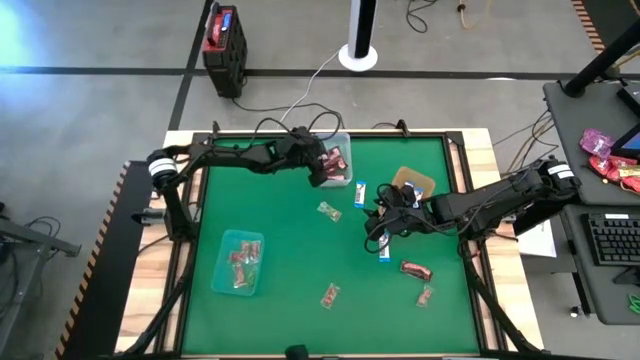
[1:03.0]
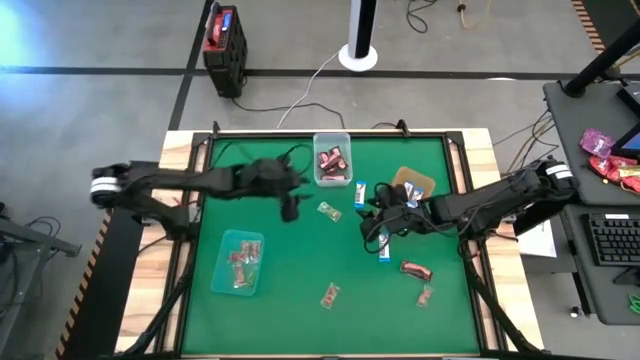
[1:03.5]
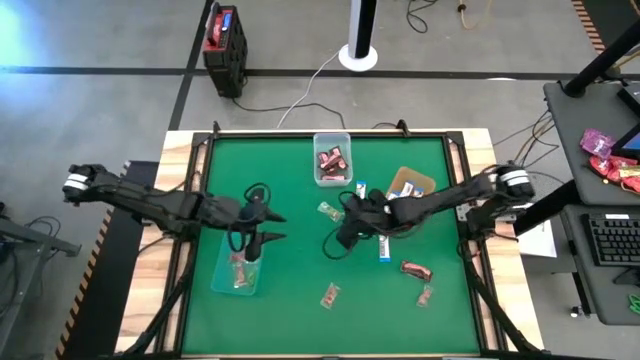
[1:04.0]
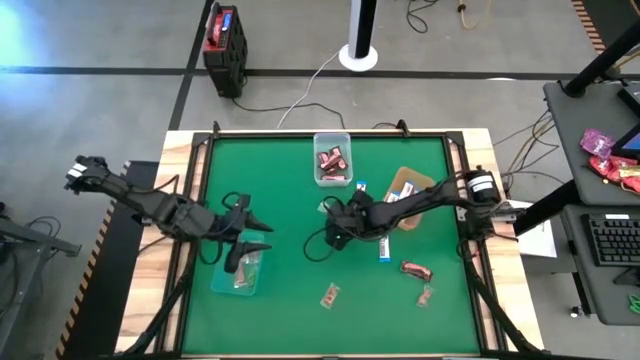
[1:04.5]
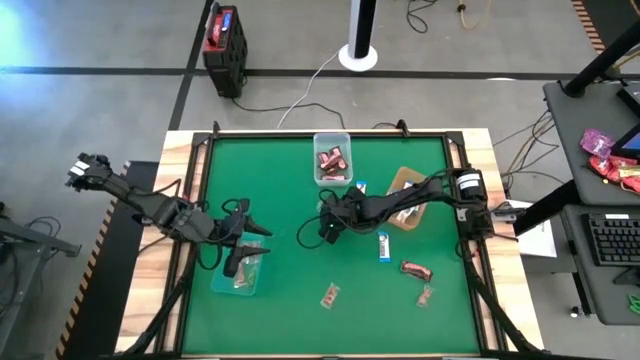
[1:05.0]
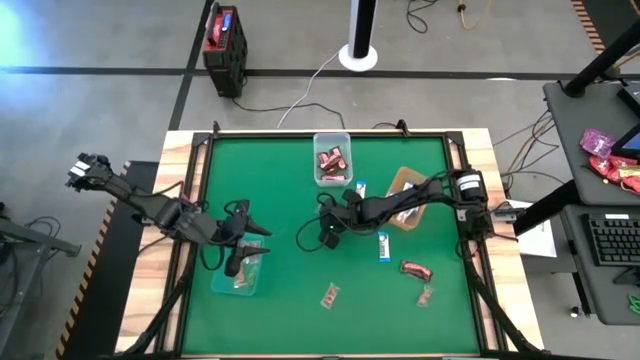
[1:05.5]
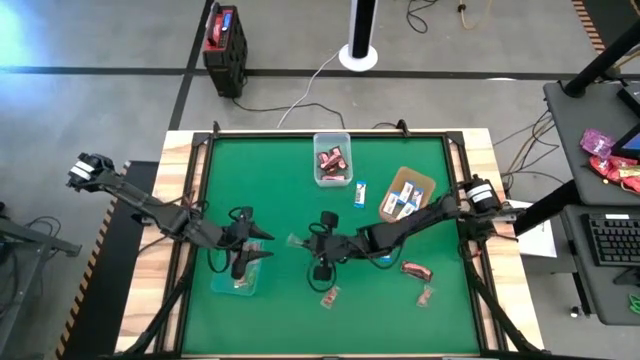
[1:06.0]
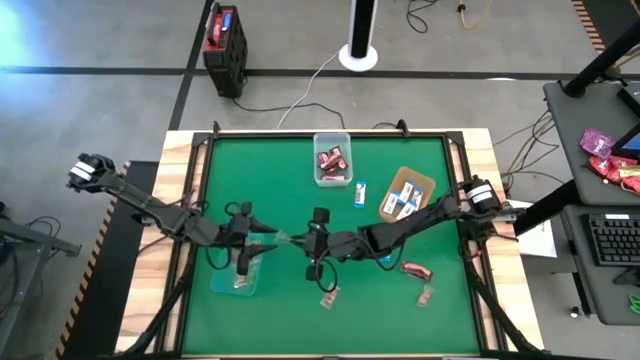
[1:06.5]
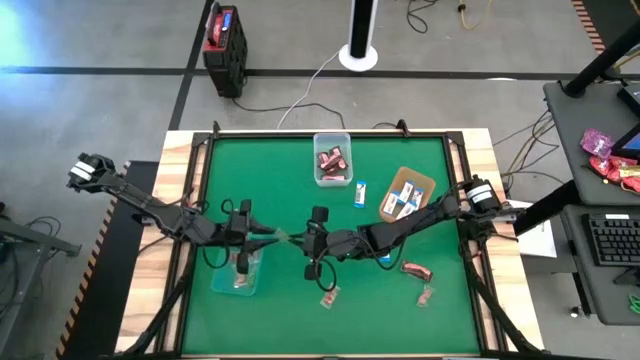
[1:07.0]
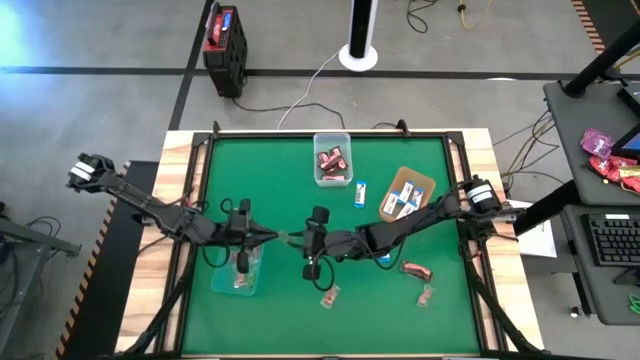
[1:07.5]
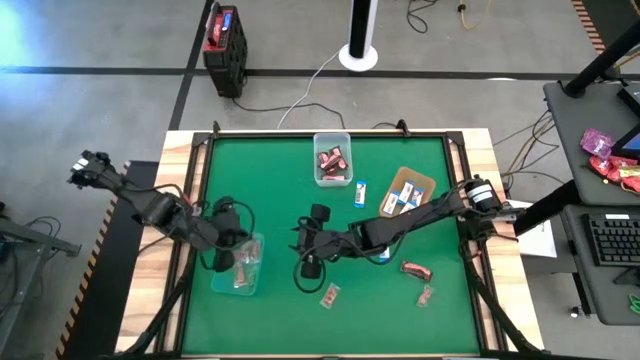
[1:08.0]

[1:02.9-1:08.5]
Task: Sort candy by brand, put in halloween buckets
Put the green gummy candy into the blue bin

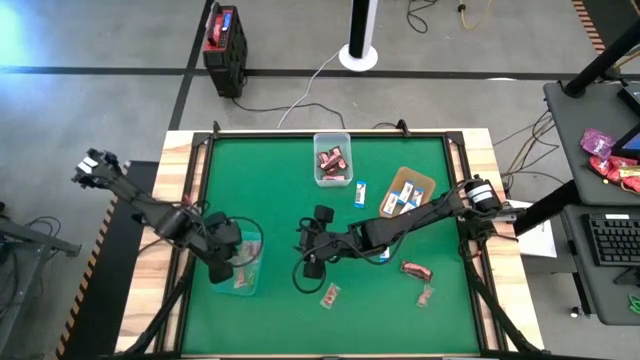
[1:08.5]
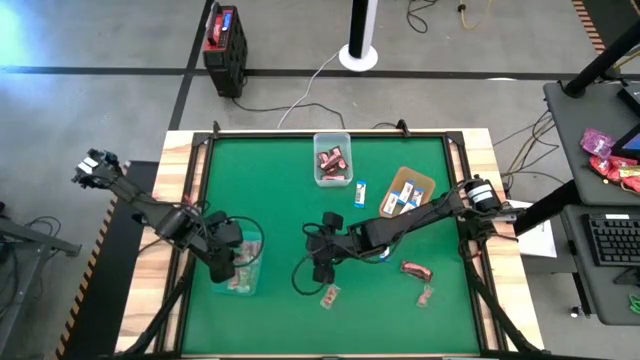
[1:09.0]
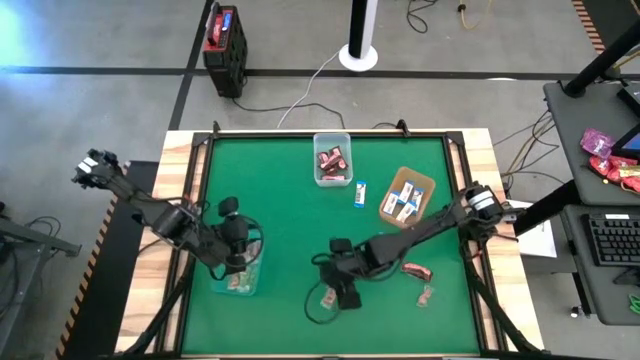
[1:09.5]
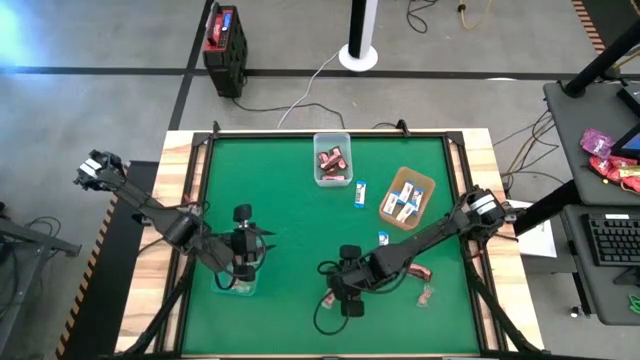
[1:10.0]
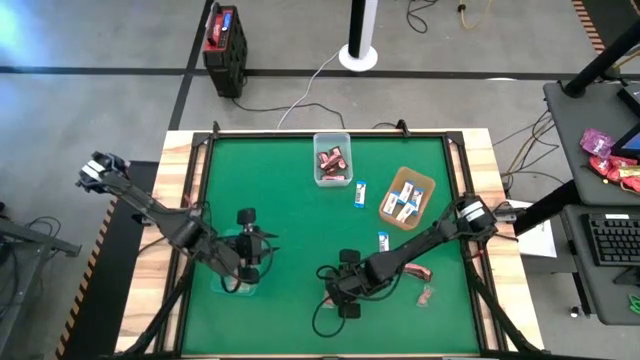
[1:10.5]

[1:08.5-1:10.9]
Put the orange gummy candy into the blue bin

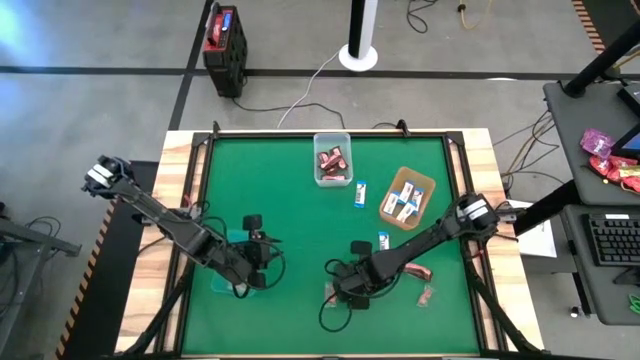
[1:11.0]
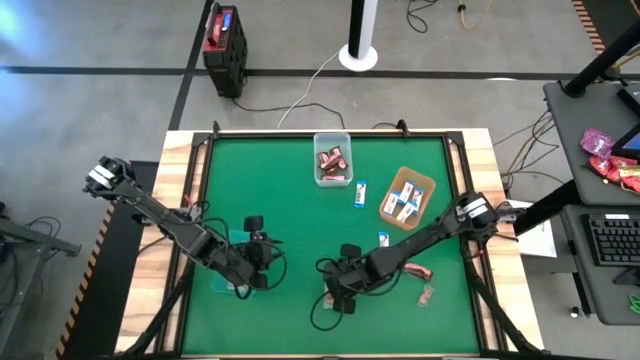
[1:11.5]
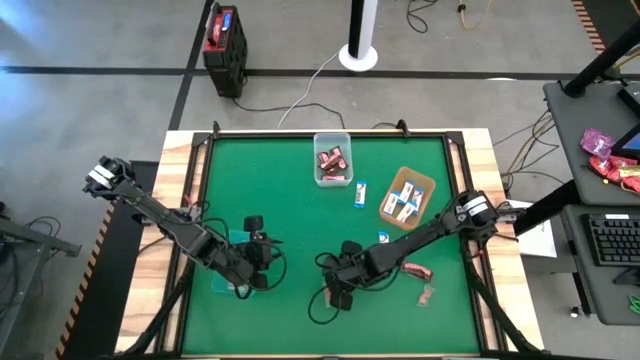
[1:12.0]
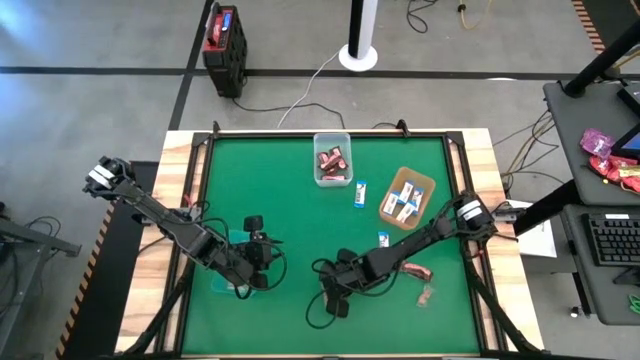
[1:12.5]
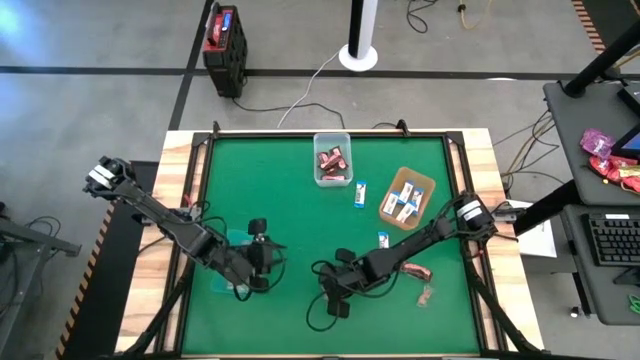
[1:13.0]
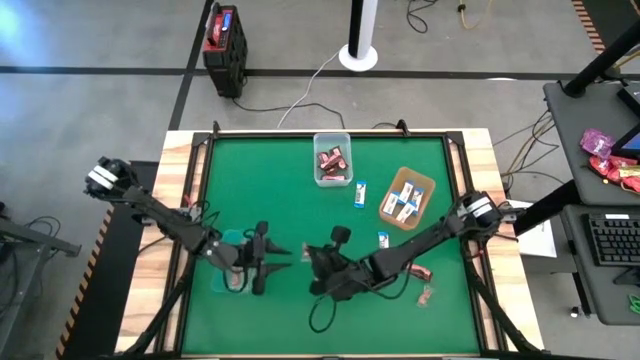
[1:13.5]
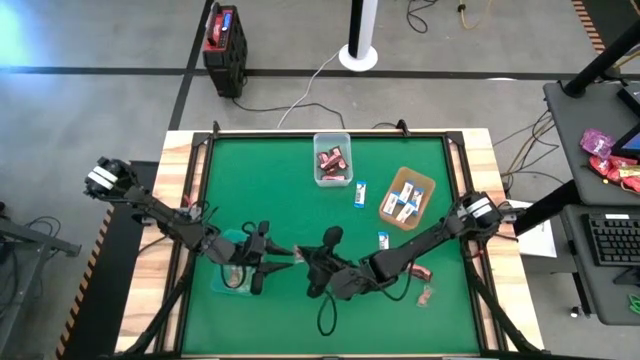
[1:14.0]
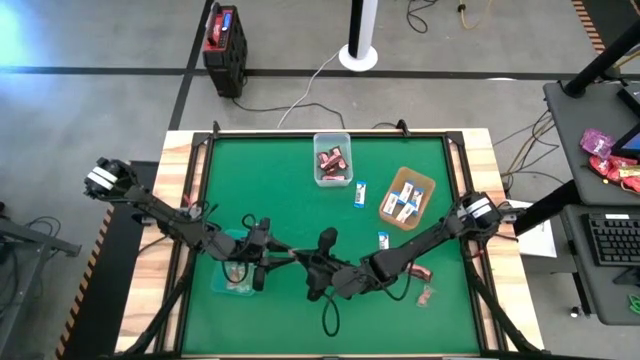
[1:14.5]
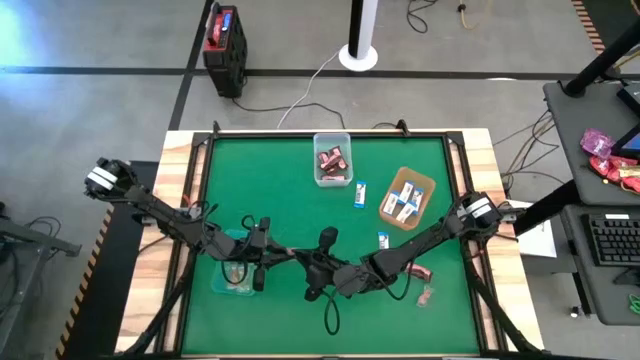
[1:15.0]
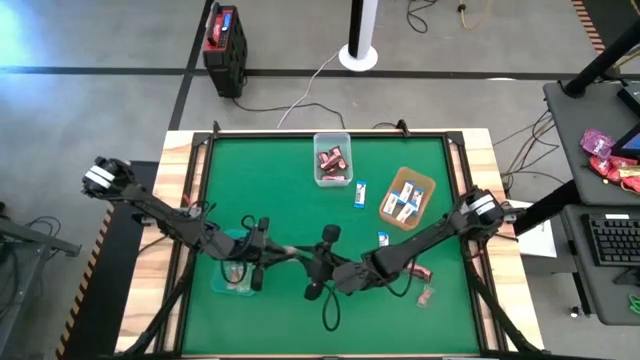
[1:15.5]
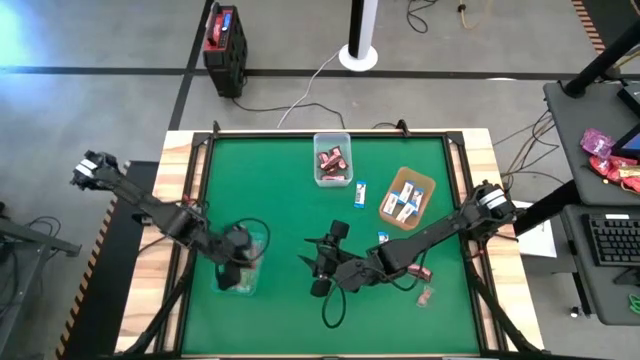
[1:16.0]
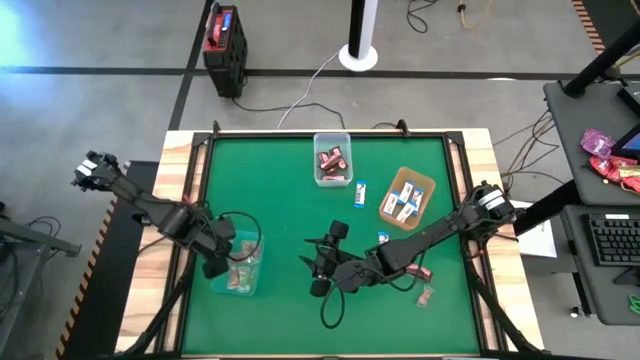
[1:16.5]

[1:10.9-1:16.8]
Put the orange gummy candy into the blue bin

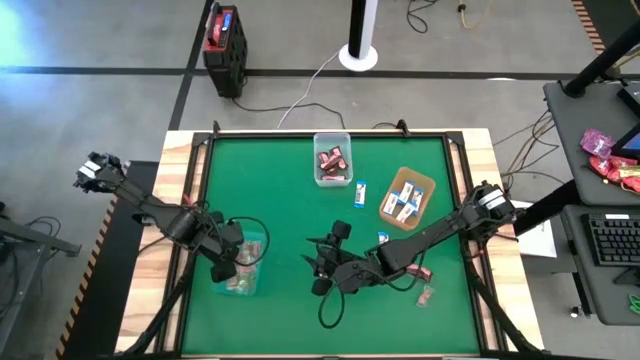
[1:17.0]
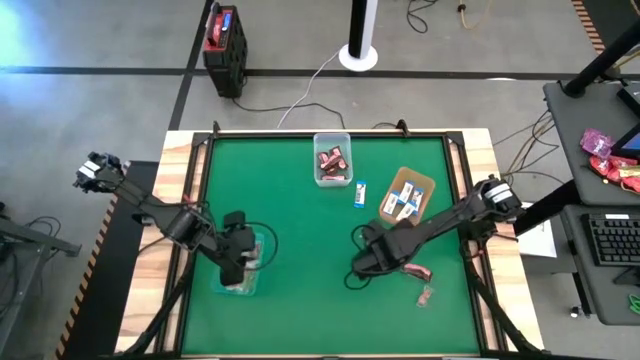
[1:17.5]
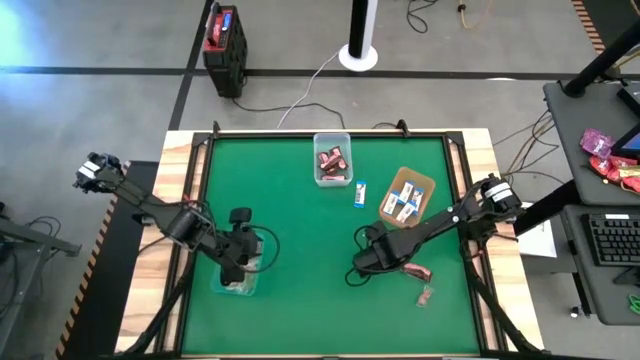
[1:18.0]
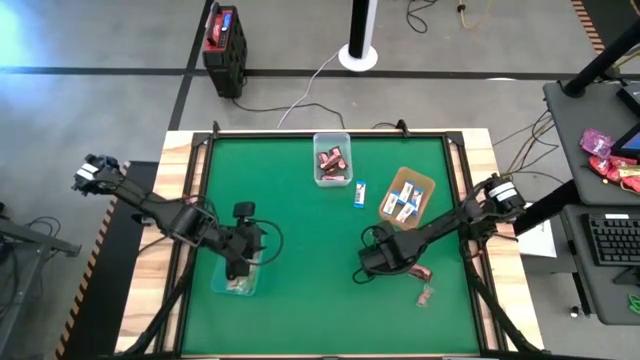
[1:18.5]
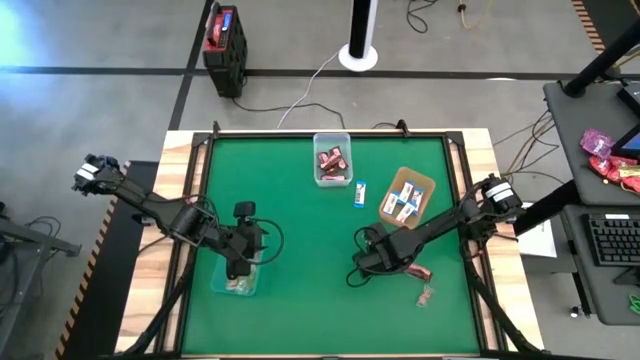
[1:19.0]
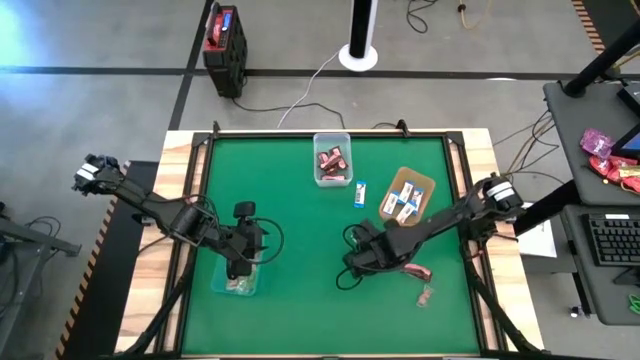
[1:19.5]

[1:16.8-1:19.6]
Put the white chocolate into the orange bin

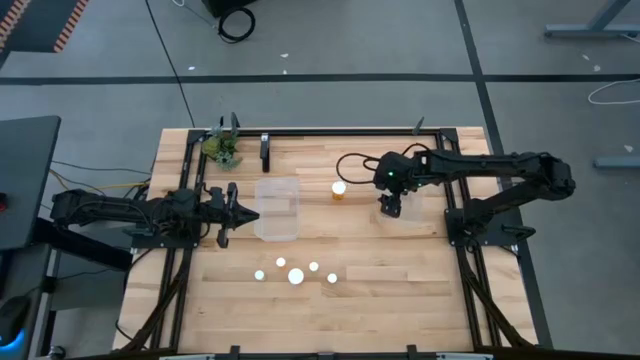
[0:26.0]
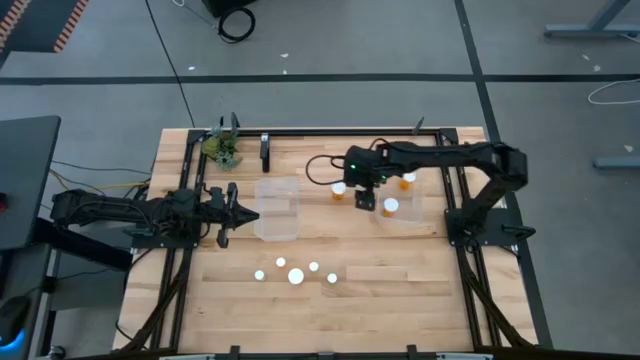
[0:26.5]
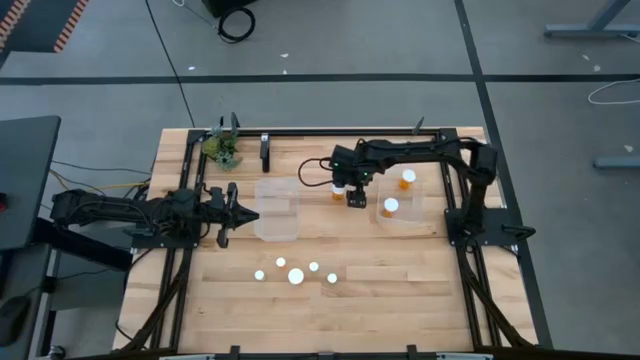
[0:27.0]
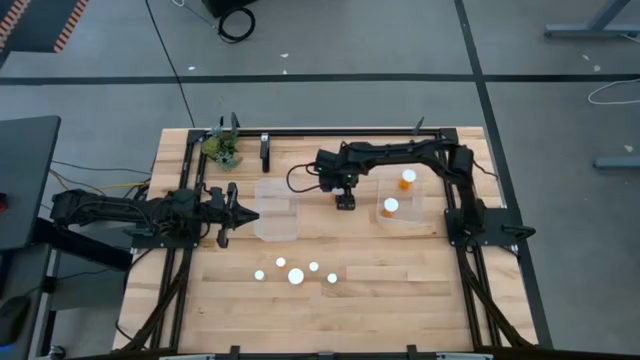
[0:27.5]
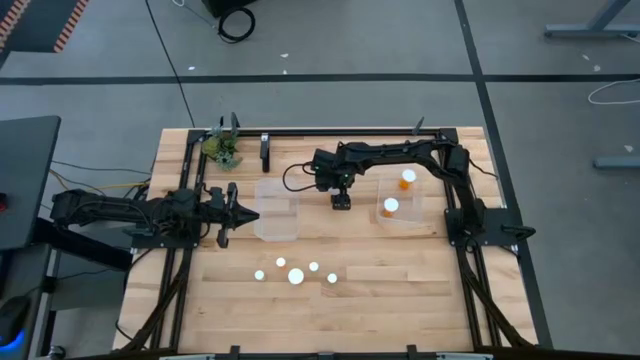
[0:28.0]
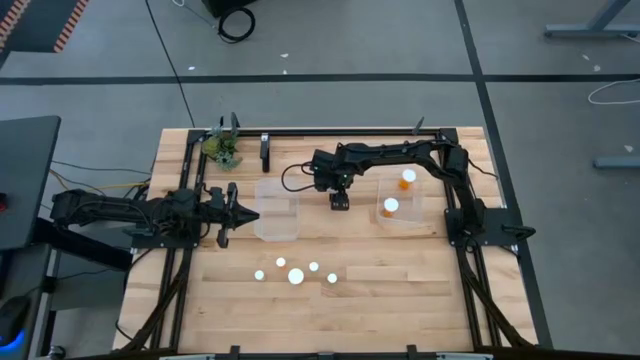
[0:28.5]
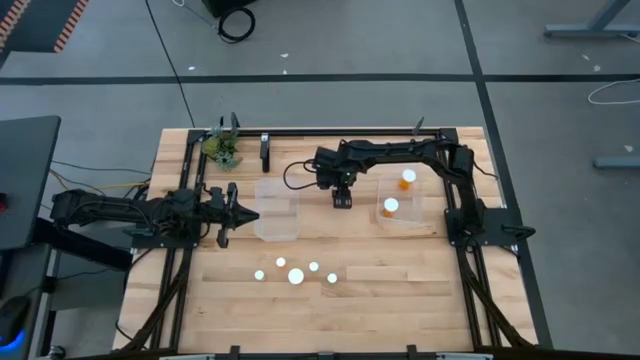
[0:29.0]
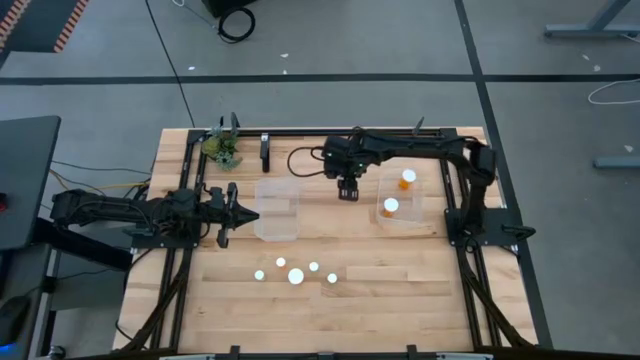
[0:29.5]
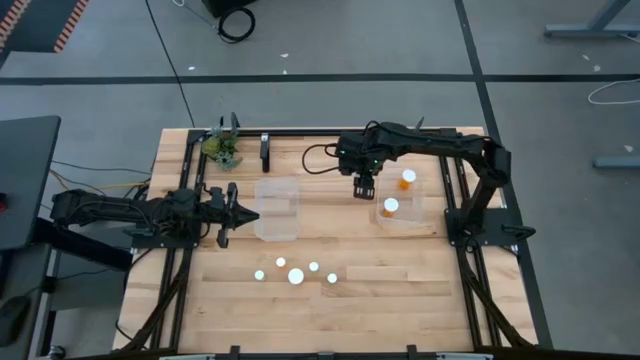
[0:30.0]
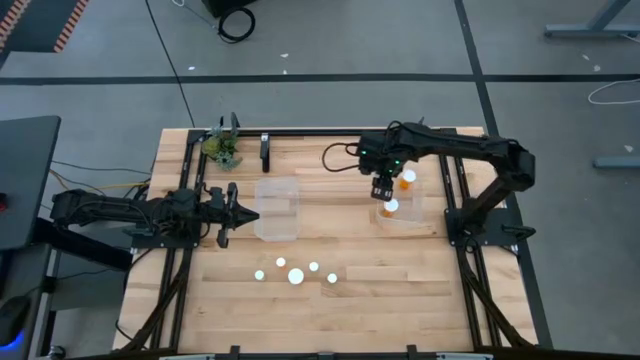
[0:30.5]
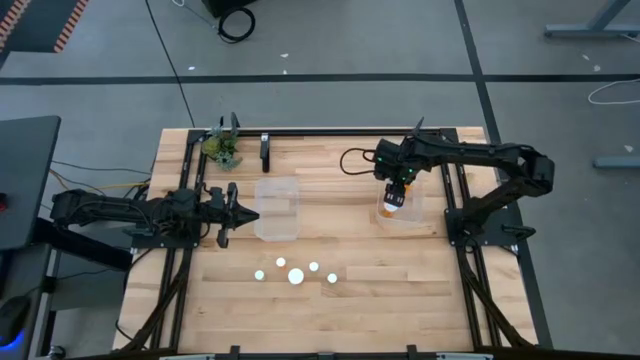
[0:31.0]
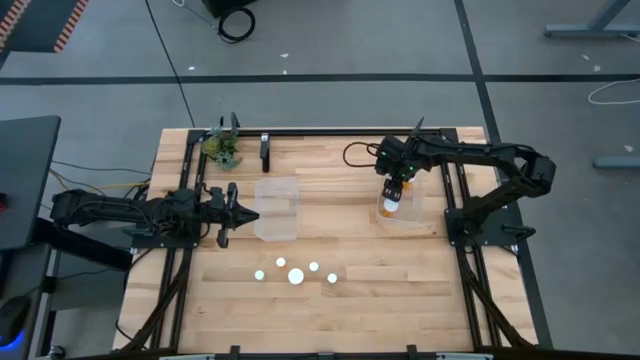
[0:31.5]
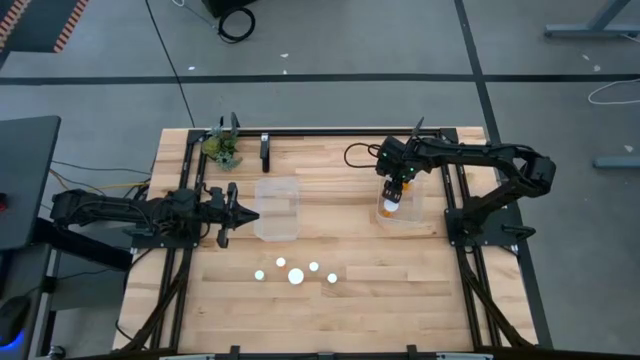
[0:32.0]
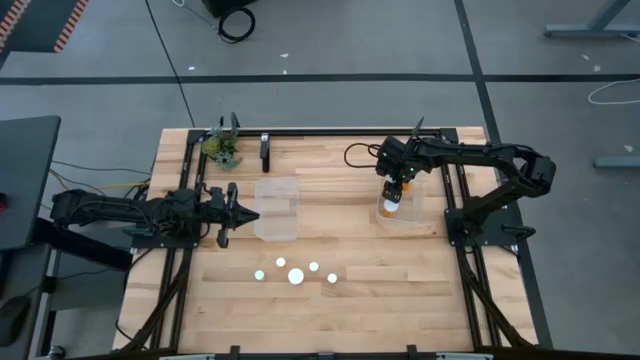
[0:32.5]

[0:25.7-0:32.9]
Task: Pick and place medicine bottles into bin by pill shape (circle, oval)
Put the large orange pill bottle into the right transparent bin
